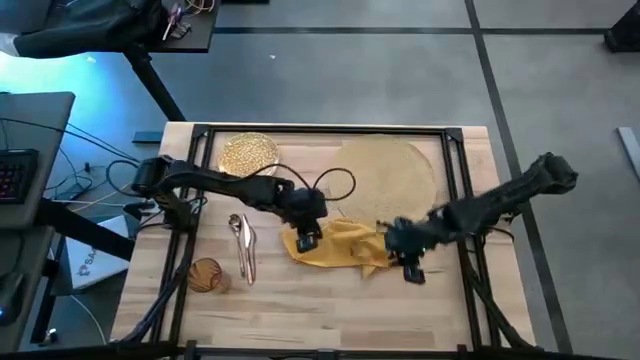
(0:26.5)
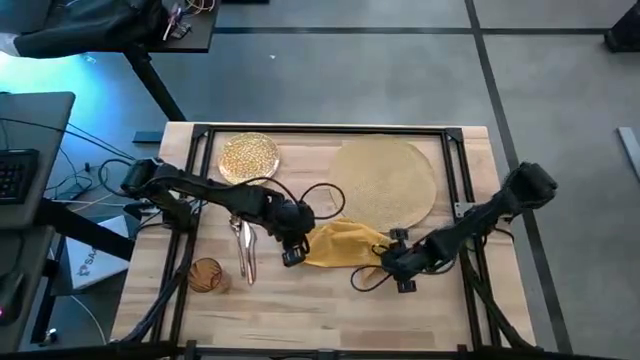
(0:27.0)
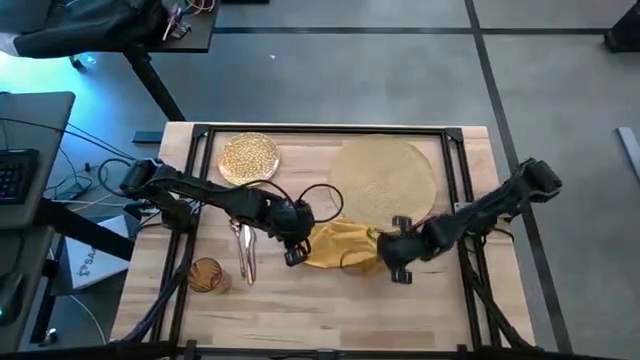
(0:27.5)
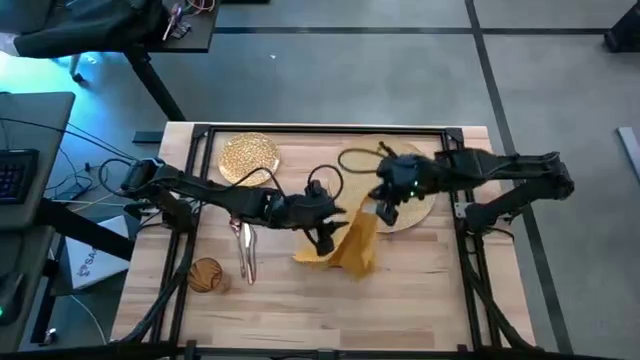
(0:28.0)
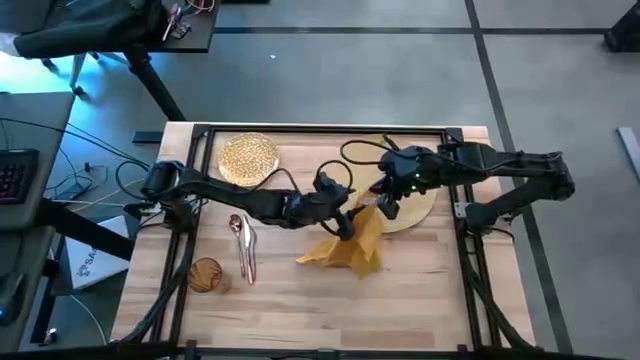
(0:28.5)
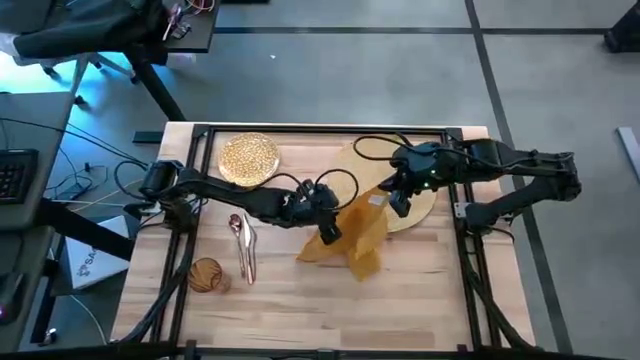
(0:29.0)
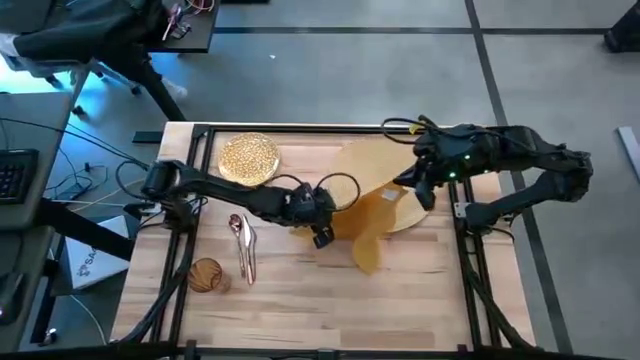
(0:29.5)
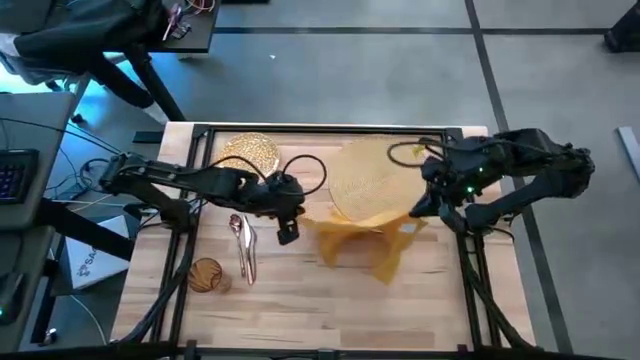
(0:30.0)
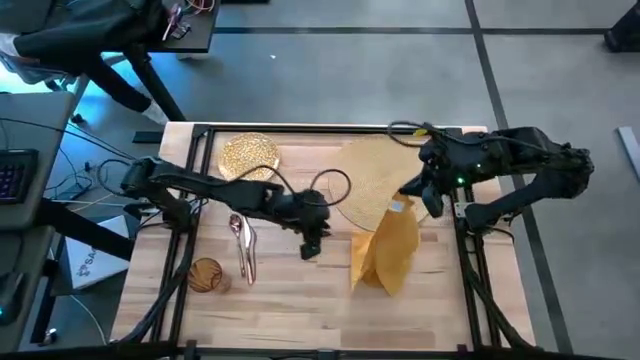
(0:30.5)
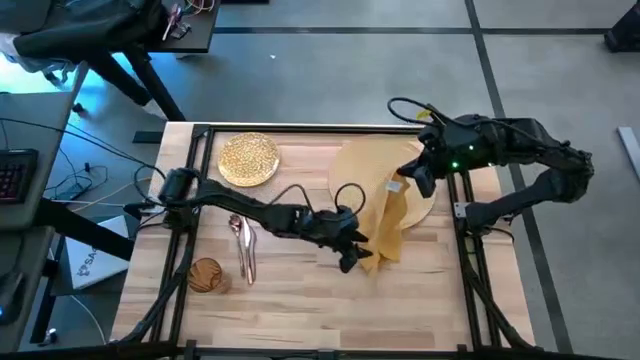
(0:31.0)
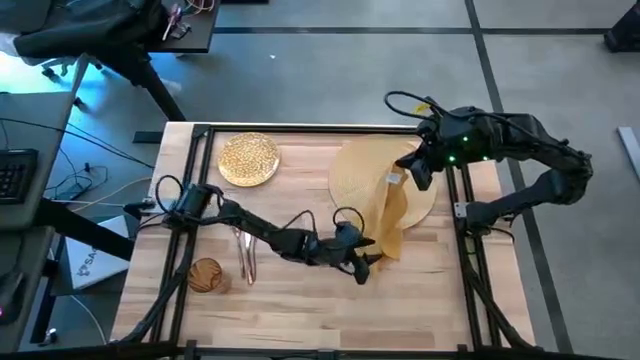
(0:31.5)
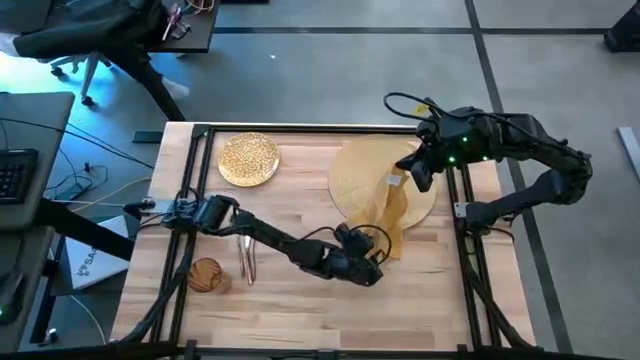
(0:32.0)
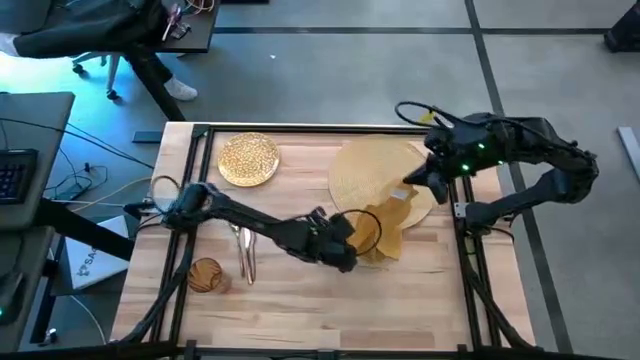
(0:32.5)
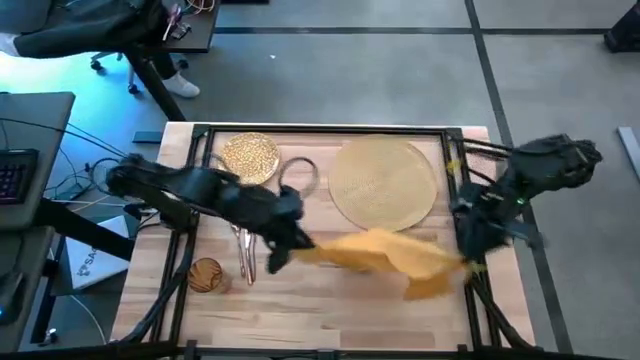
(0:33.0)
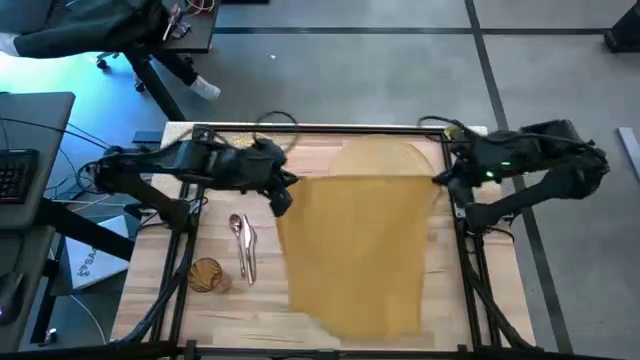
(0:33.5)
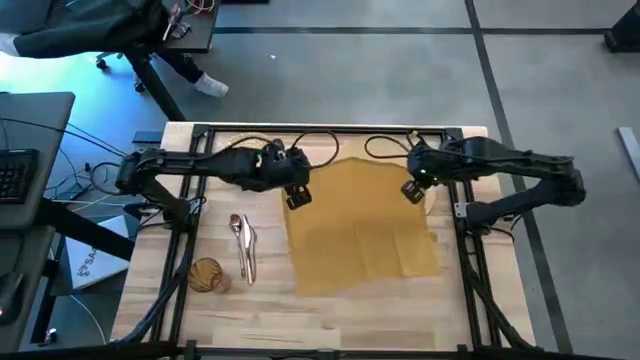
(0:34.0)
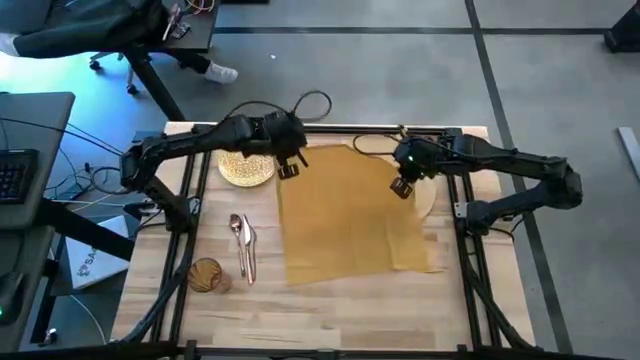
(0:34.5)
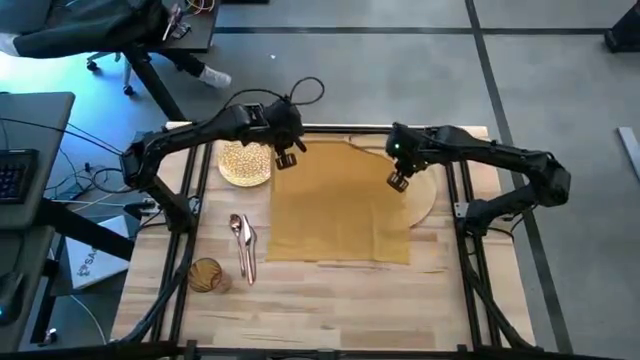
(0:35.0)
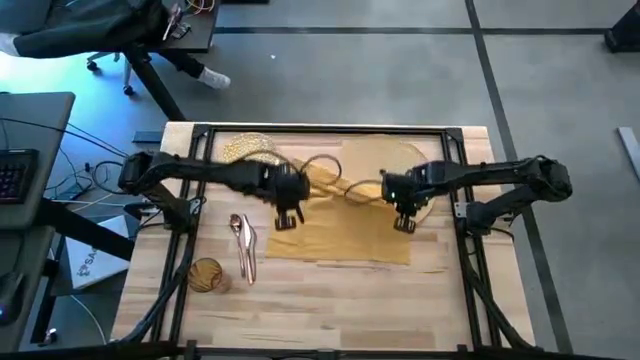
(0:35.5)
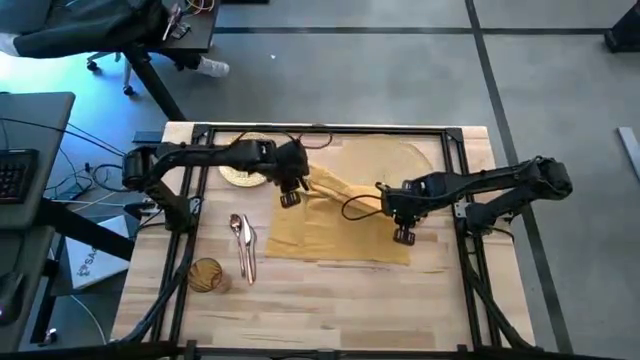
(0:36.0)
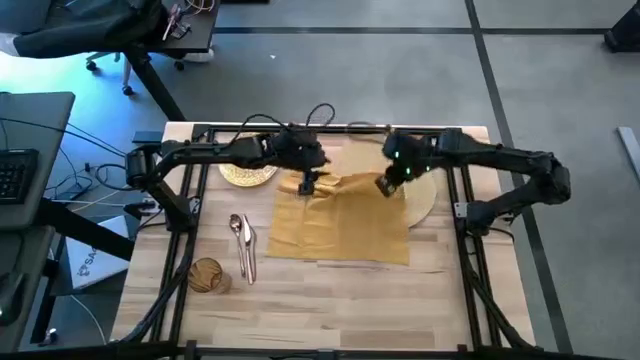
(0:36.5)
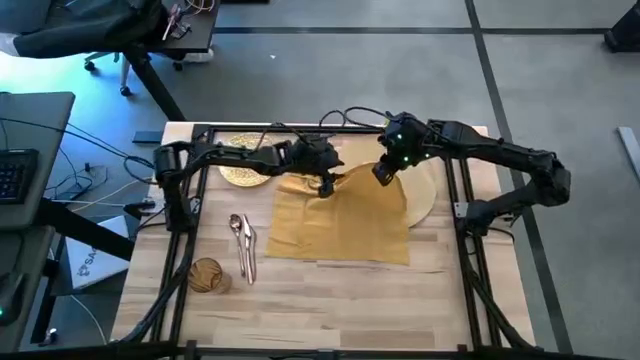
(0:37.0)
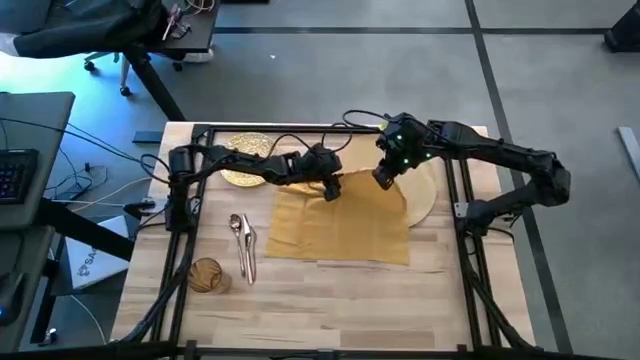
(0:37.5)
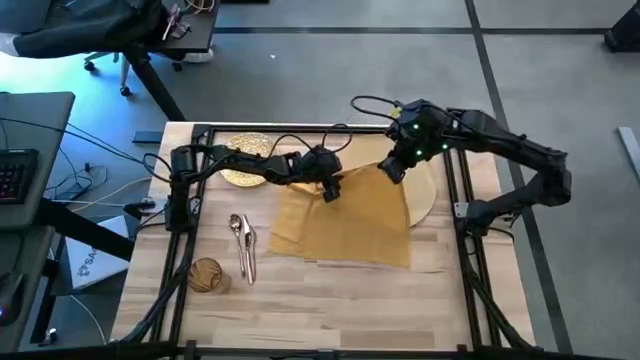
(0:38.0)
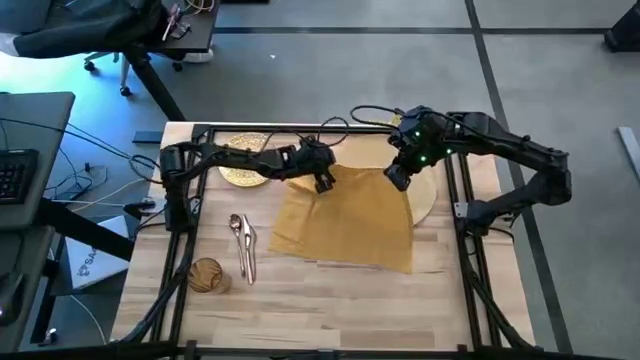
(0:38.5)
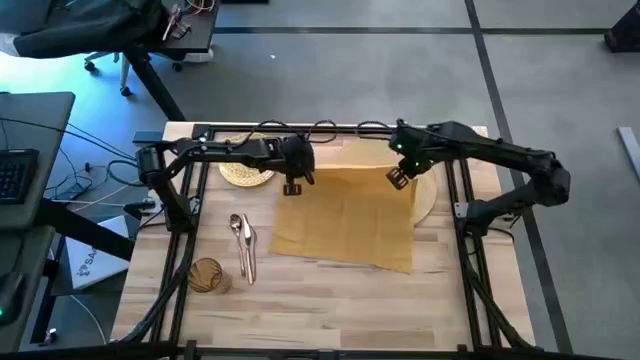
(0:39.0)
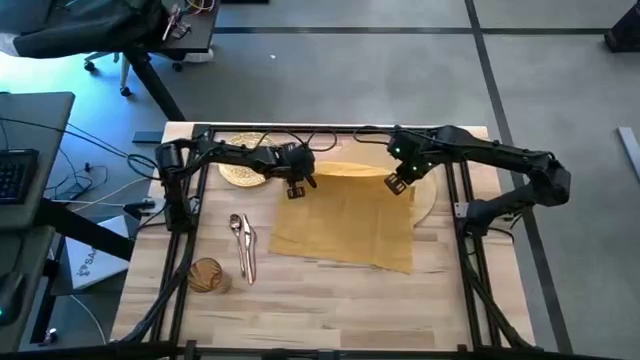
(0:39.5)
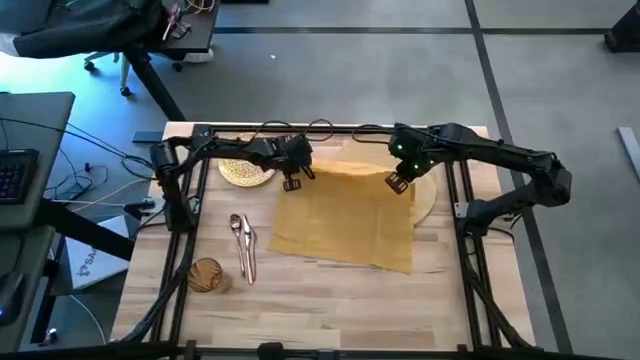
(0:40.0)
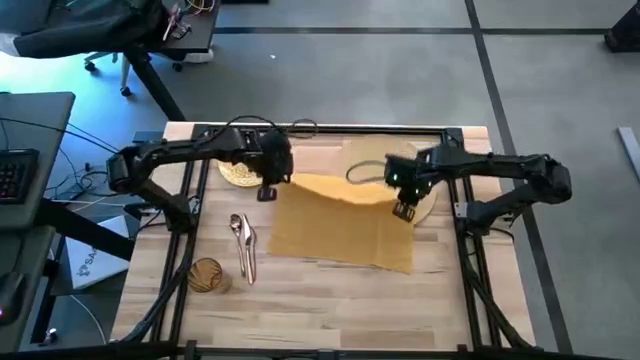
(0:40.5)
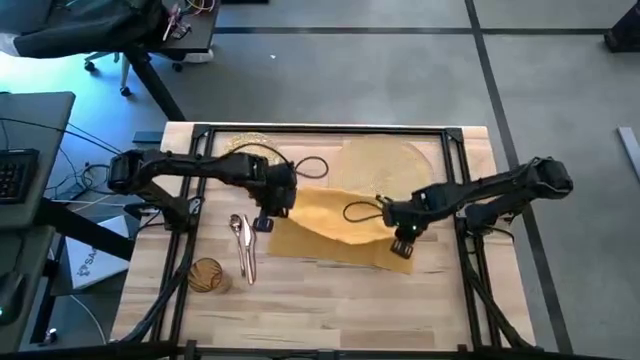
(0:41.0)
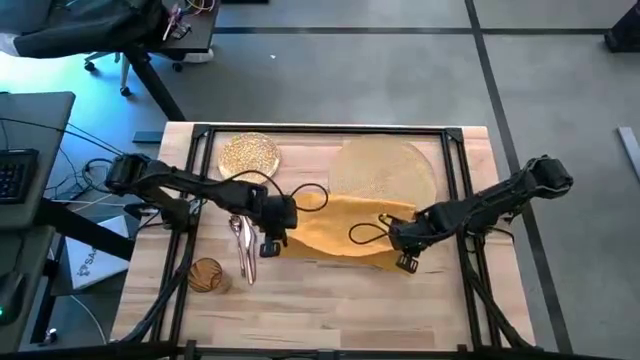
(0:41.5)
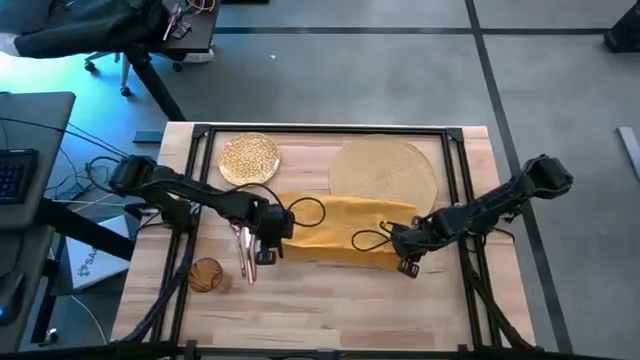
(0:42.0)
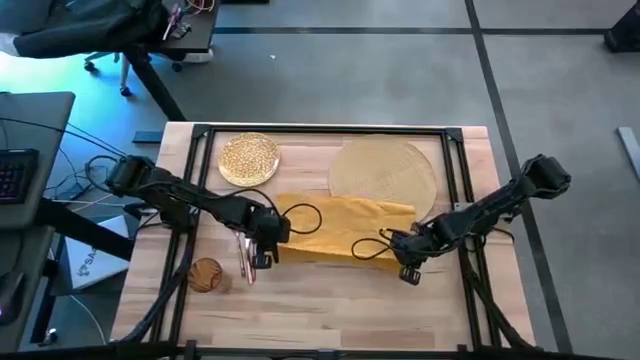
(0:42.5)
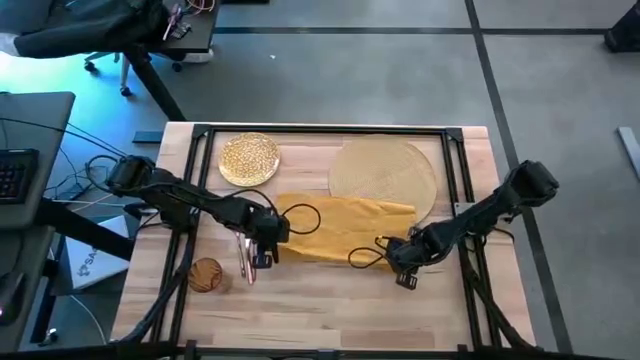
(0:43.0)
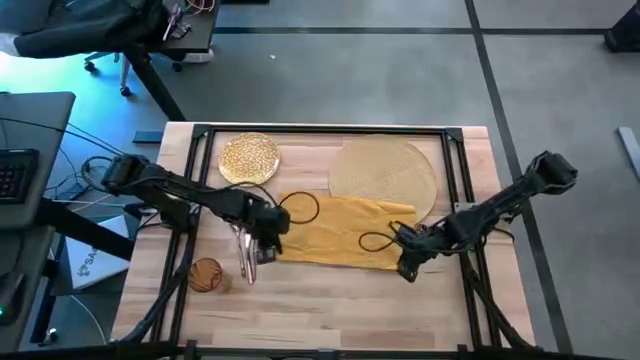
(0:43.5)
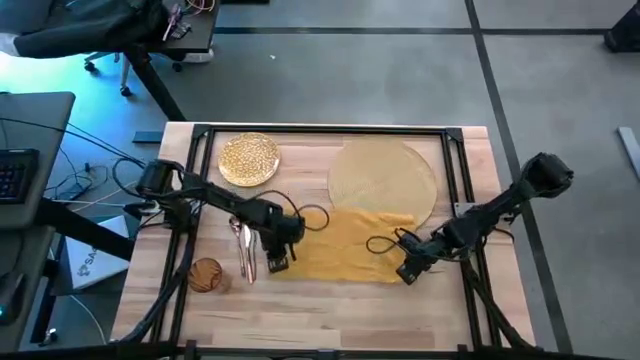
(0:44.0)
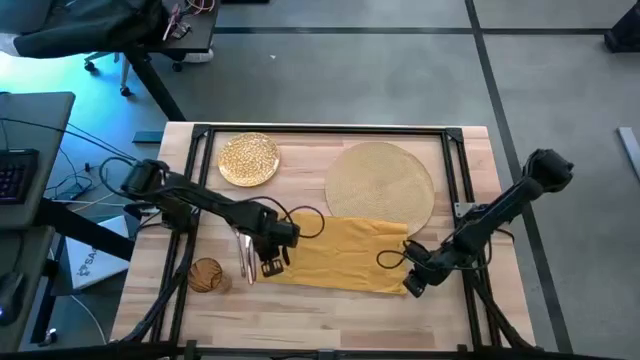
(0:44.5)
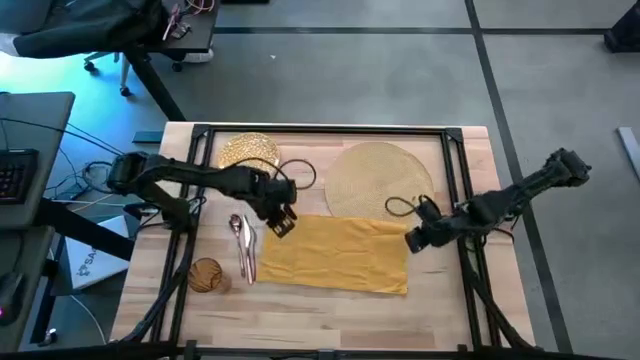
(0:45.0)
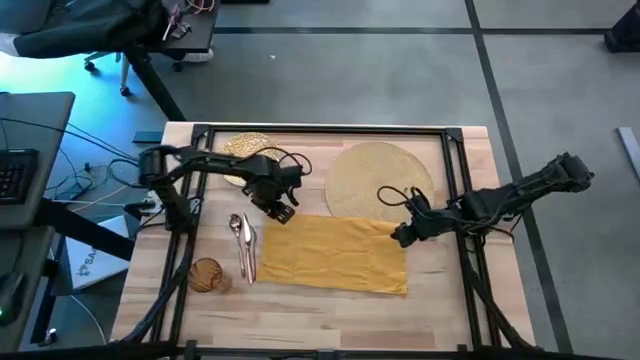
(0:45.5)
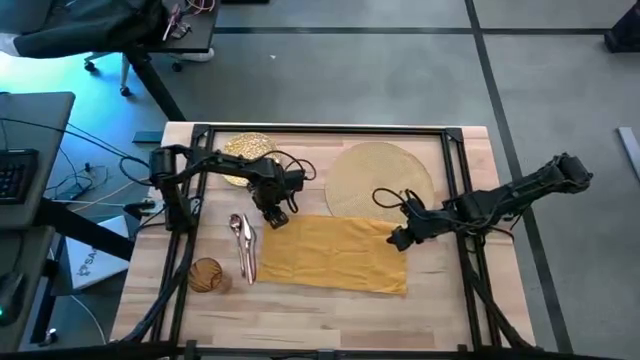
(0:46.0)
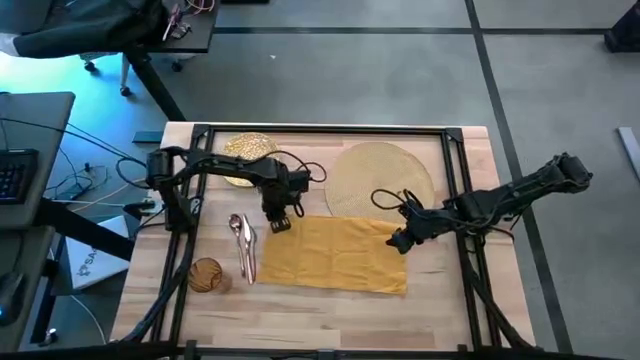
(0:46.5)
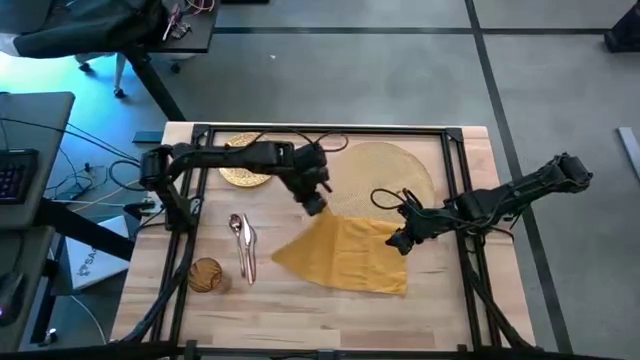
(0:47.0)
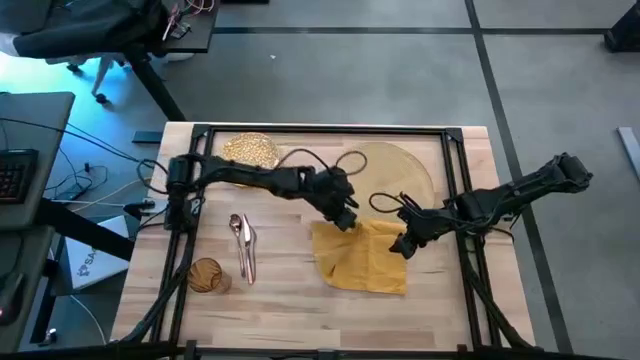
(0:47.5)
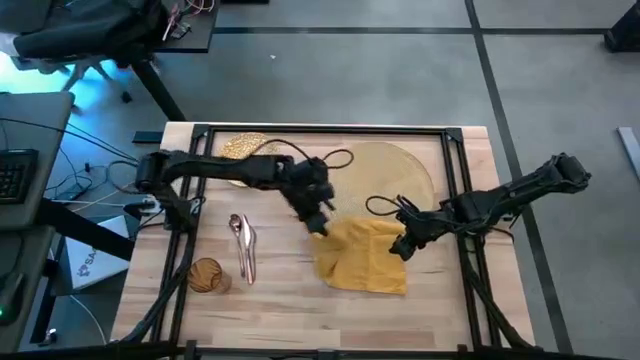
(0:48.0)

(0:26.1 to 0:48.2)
Task: Set table place
Fold the yellow table napkin on the table
